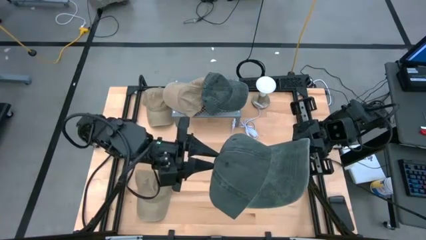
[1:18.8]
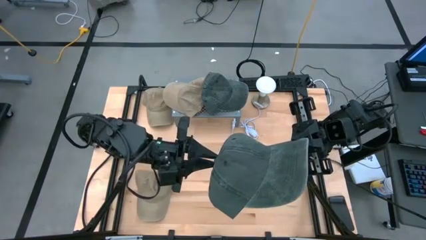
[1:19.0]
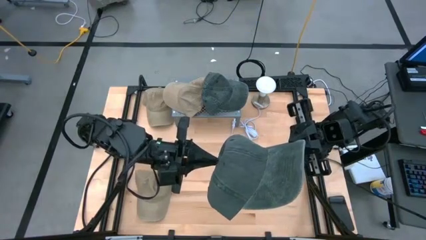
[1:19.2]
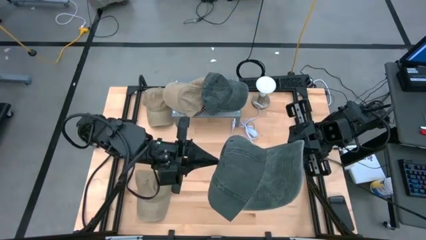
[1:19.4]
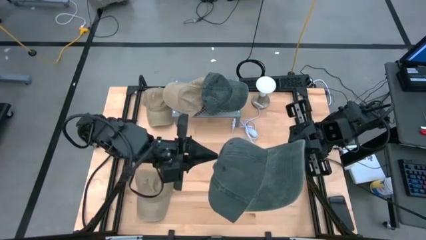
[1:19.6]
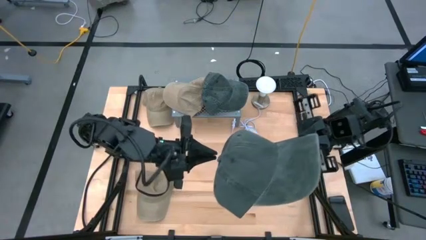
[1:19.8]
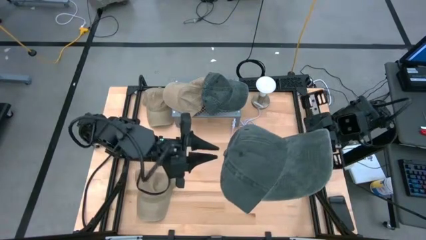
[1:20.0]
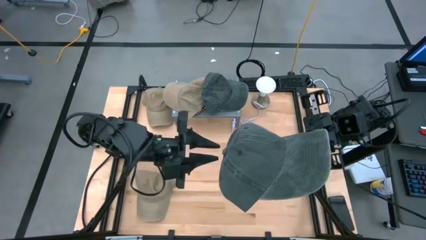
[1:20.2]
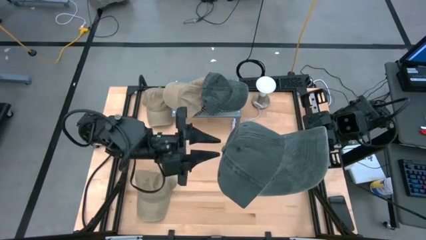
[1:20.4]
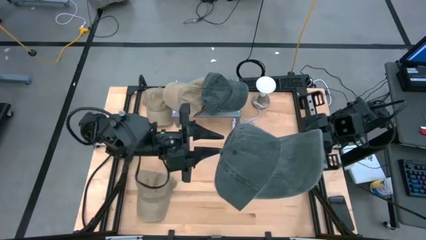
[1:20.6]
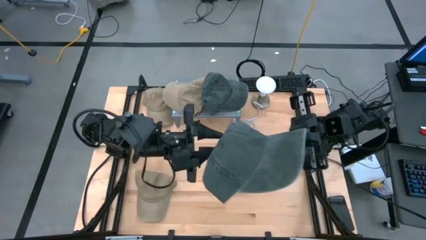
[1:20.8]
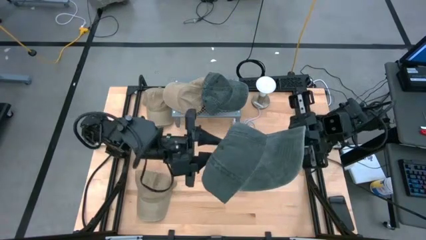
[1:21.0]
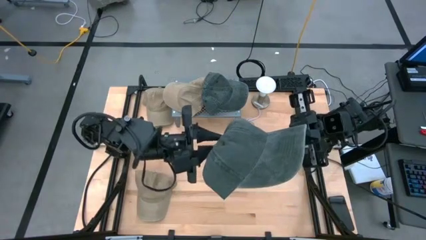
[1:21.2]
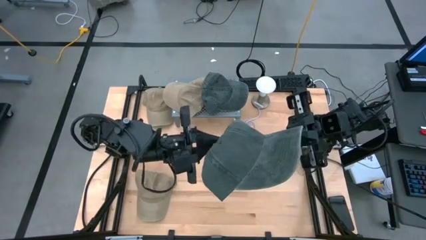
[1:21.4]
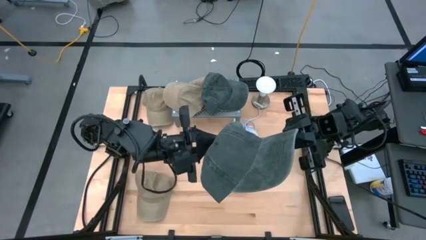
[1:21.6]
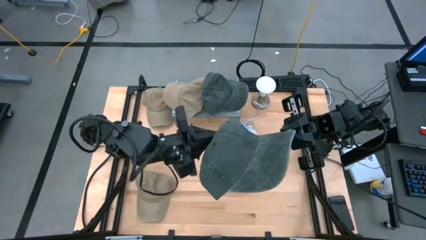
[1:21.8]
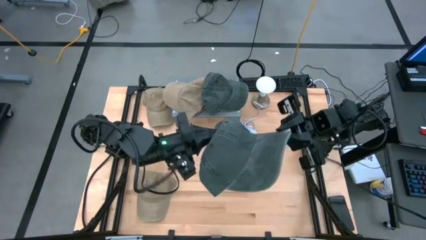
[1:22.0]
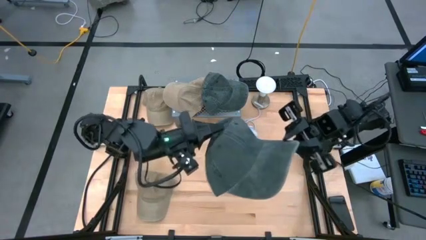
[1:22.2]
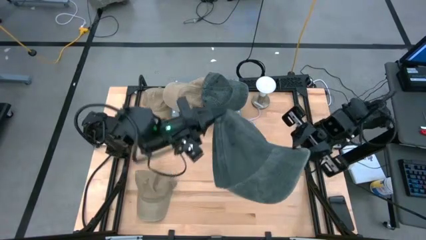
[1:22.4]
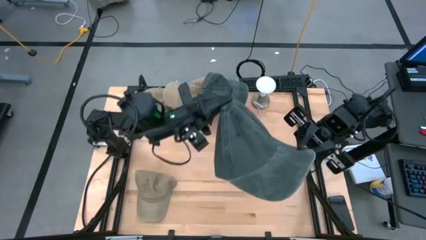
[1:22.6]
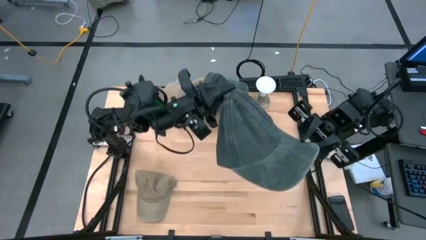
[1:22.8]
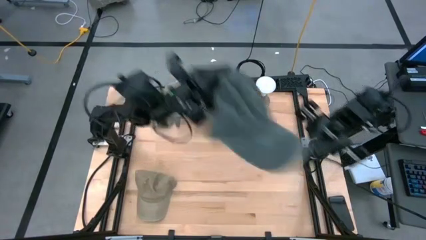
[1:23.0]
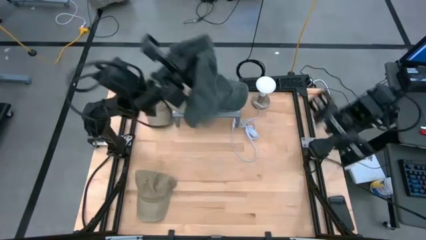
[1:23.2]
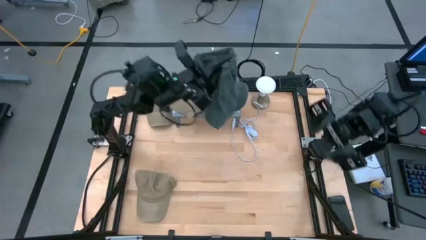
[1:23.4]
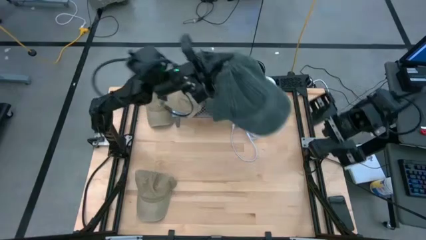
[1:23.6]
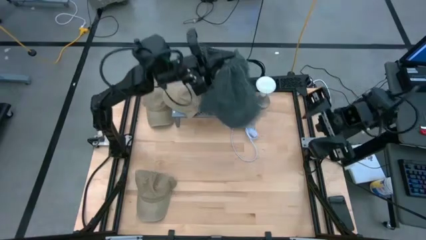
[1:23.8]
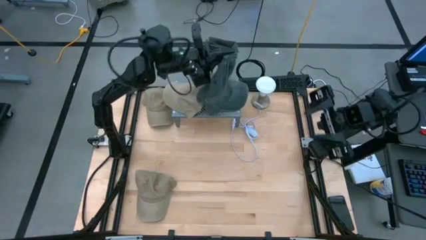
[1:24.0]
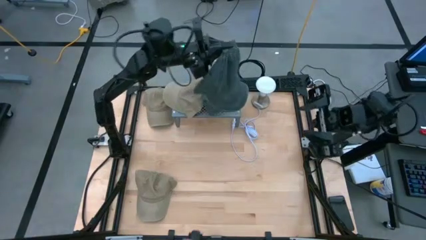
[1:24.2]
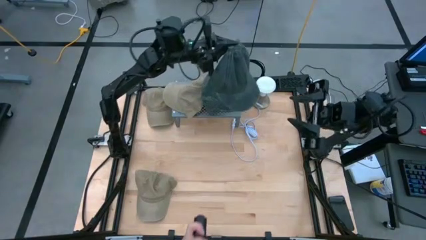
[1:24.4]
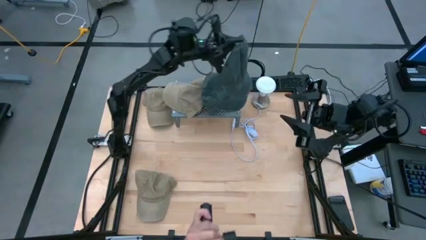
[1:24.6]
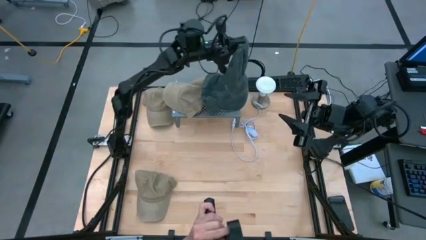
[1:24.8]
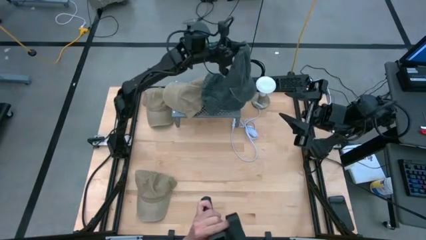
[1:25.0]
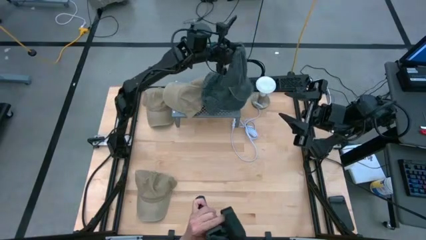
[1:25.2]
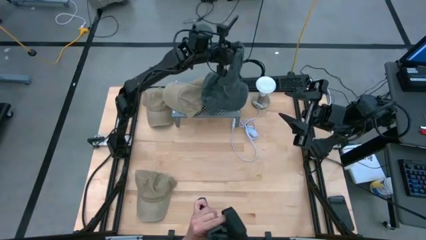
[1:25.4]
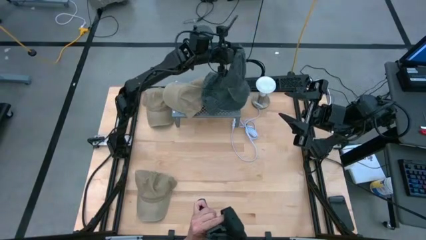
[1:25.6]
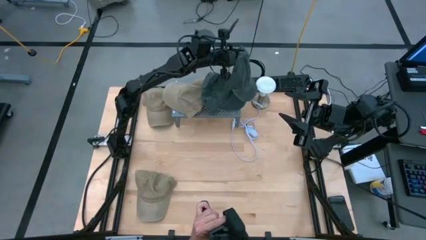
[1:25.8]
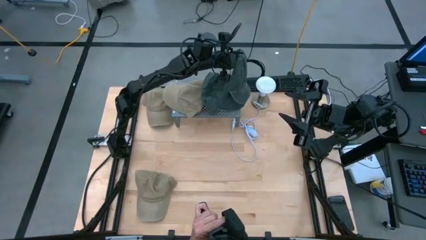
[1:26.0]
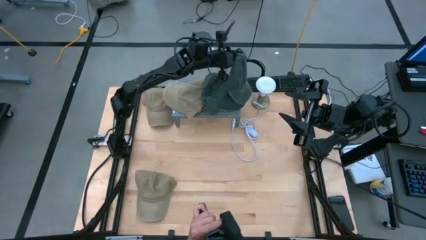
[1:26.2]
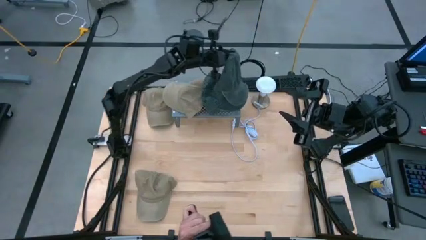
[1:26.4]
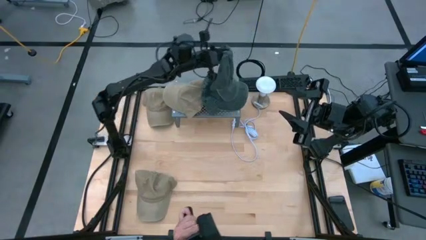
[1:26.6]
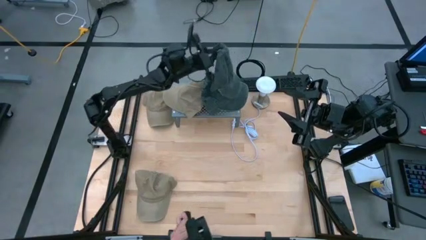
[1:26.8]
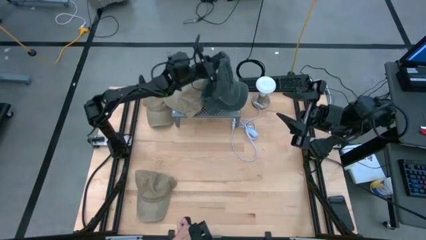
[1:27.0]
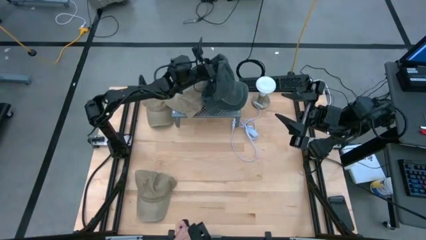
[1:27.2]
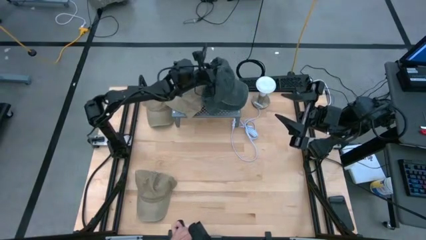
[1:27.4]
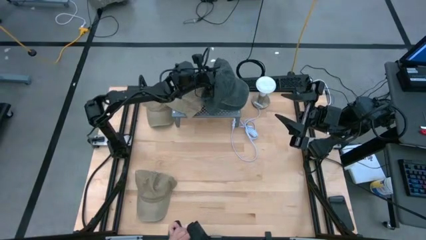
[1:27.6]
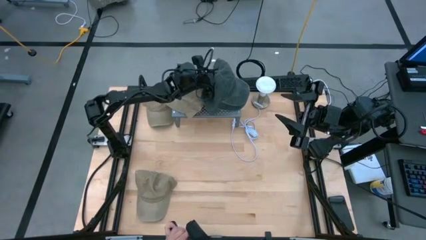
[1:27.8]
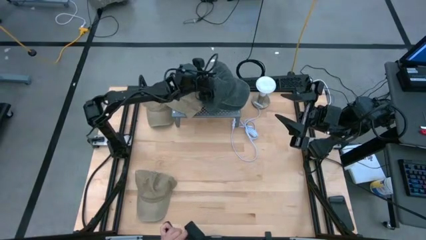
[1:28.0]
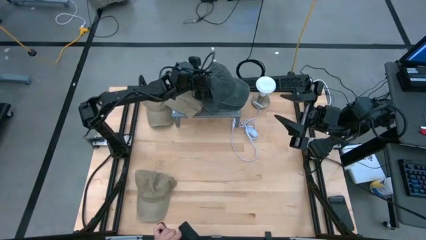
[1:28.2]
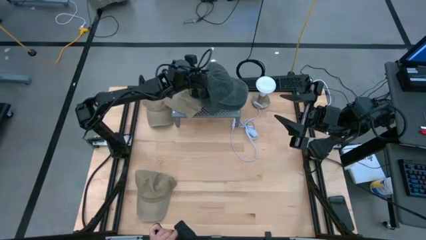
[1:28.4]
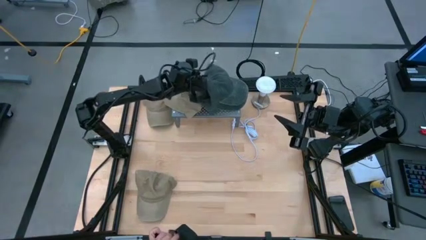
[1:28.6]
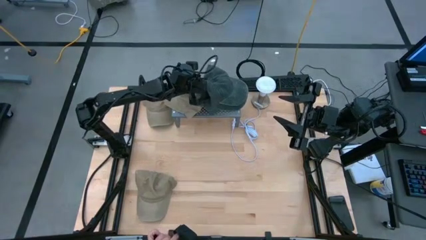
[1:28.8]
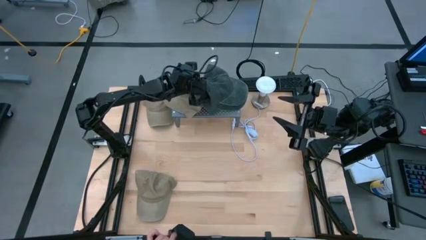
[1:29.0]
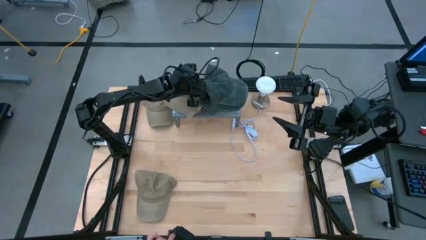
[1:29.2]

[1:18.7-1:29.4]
Task: Pick & Place hat
Stack the gray cap on the gray caps on the shelf
